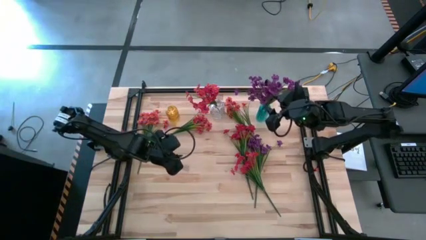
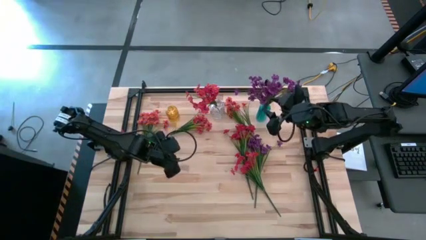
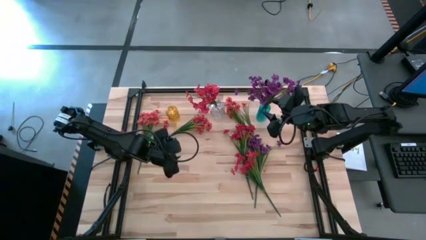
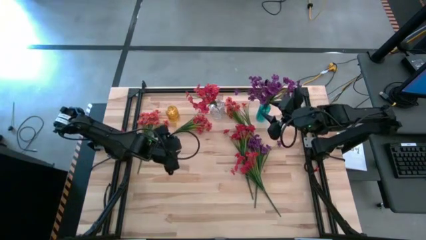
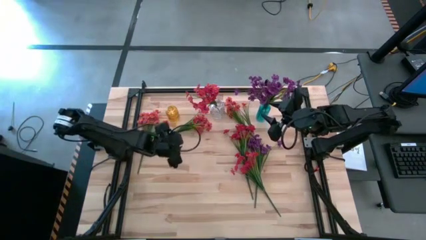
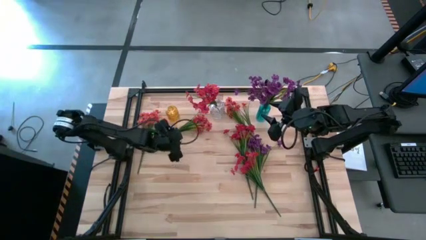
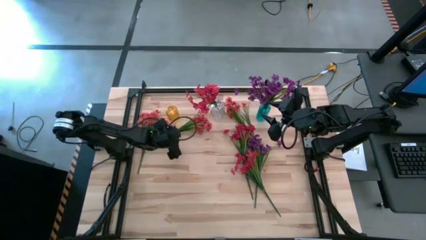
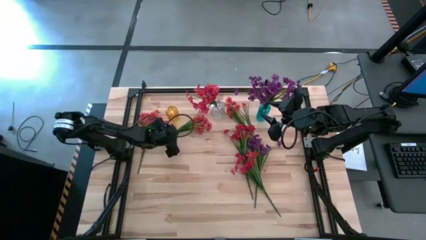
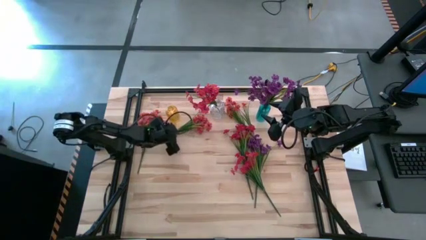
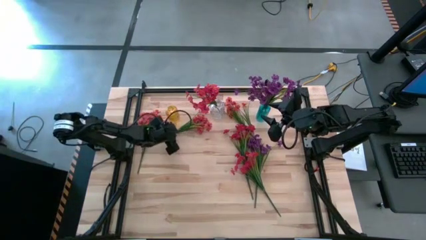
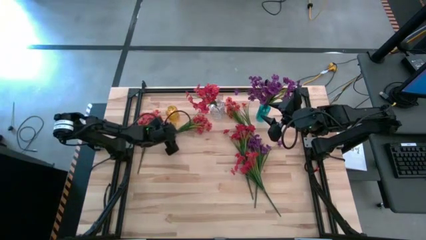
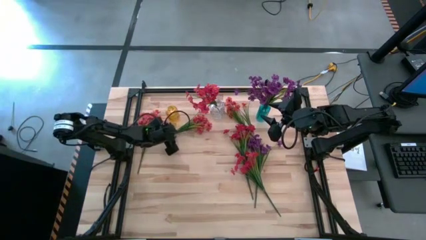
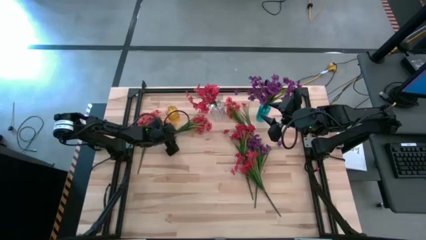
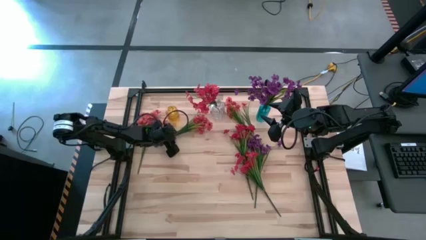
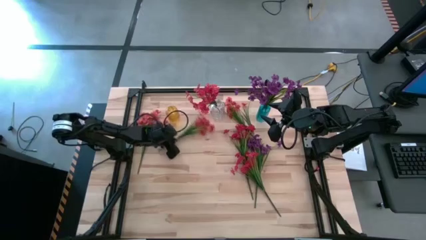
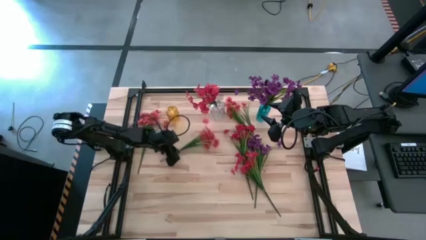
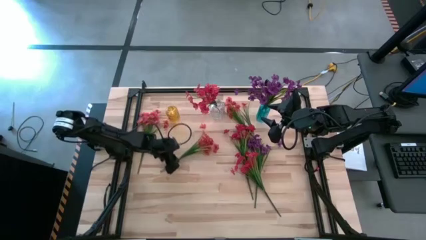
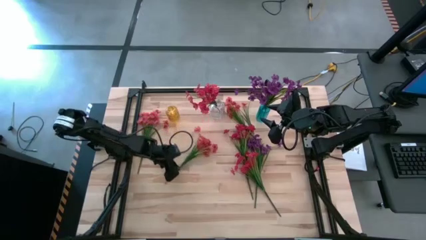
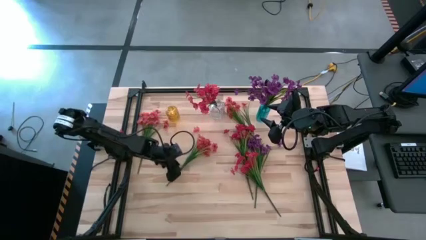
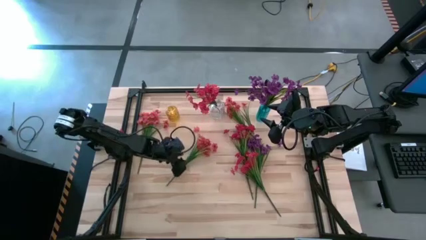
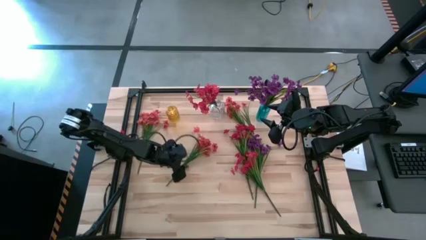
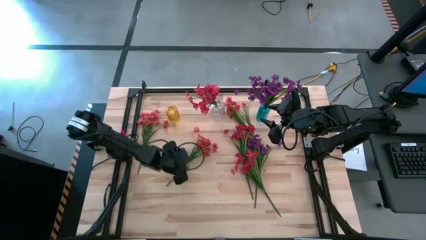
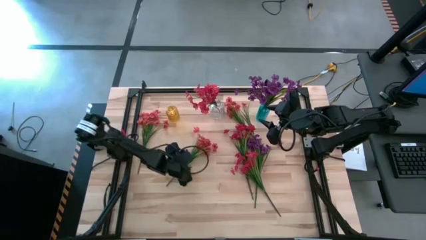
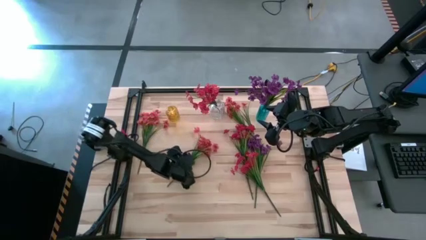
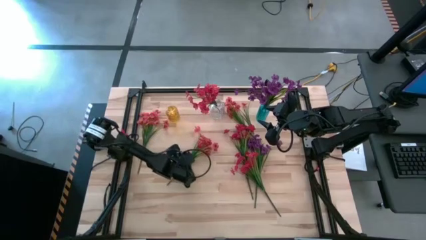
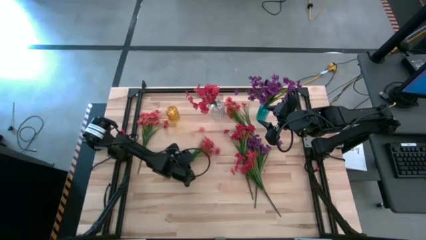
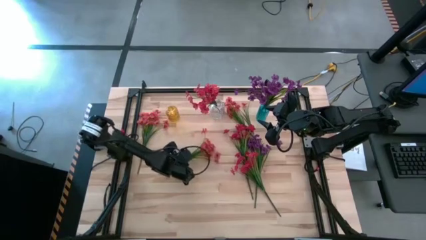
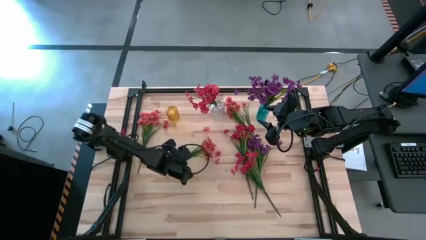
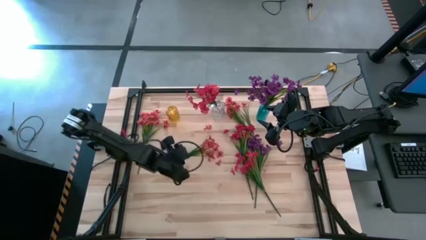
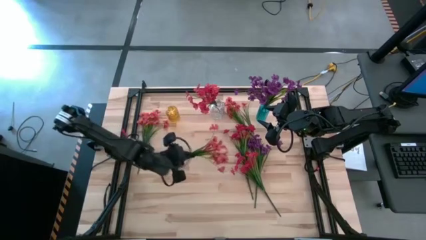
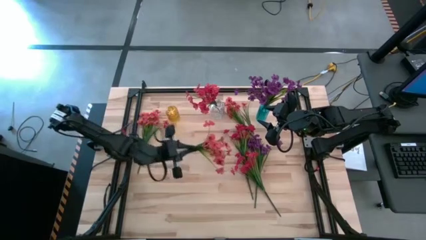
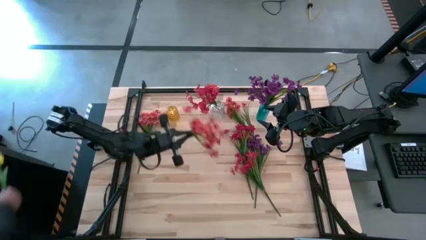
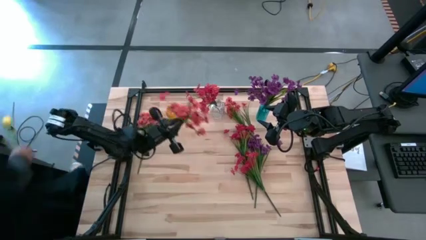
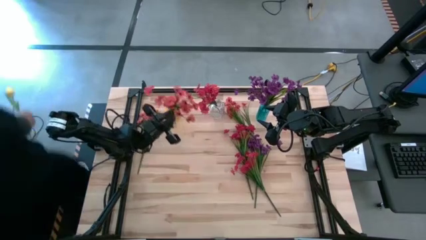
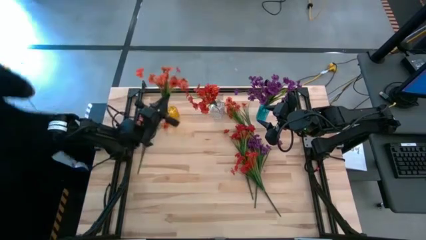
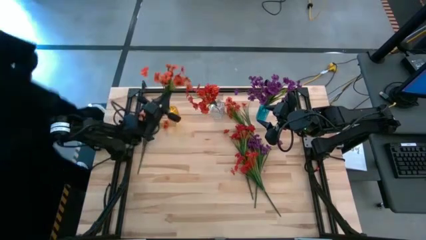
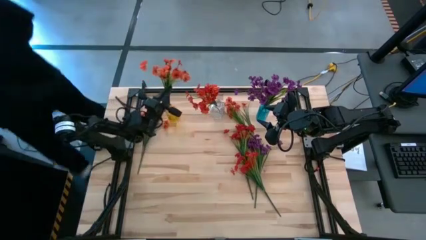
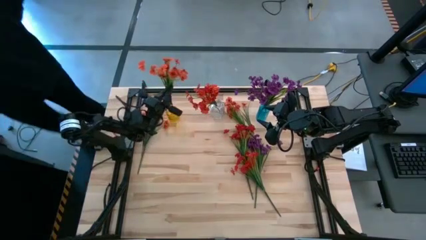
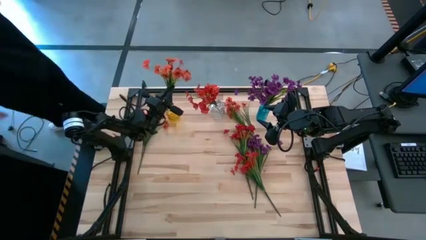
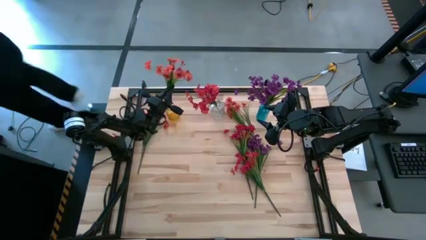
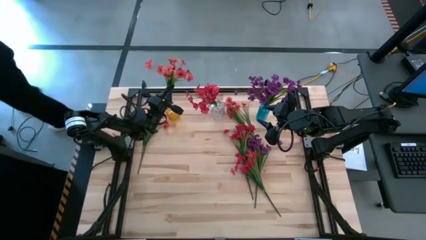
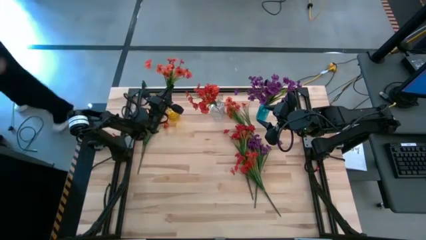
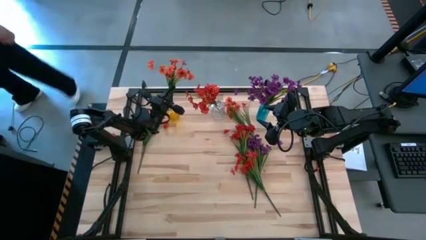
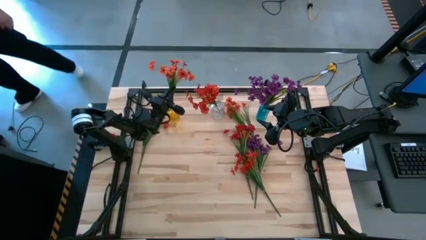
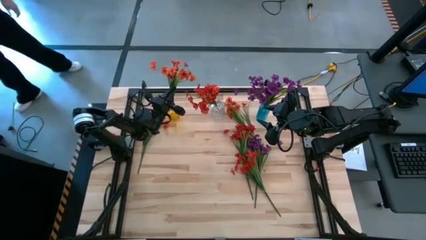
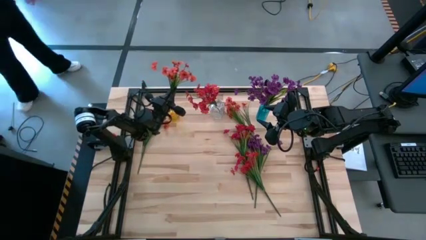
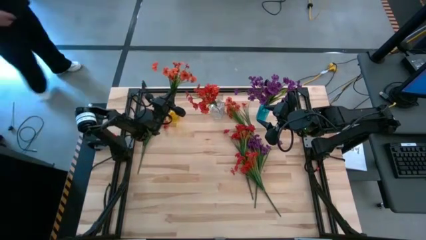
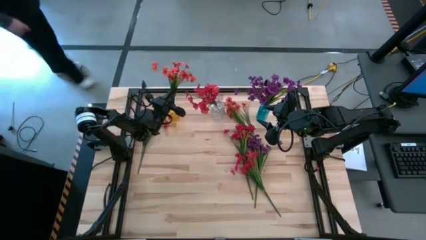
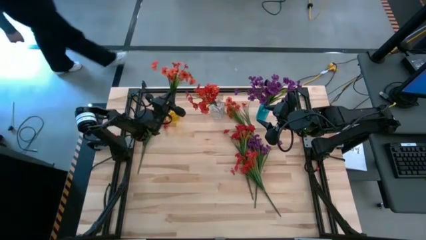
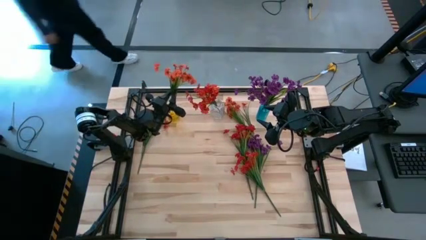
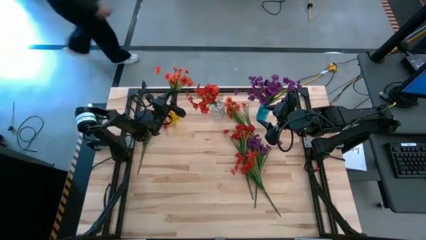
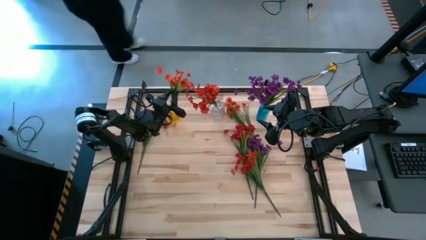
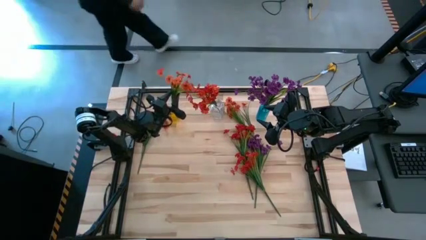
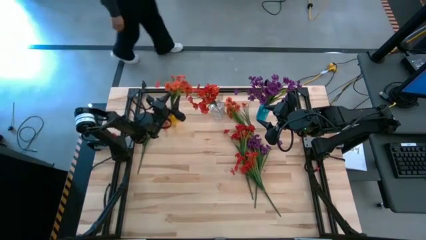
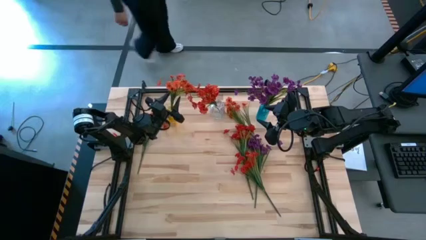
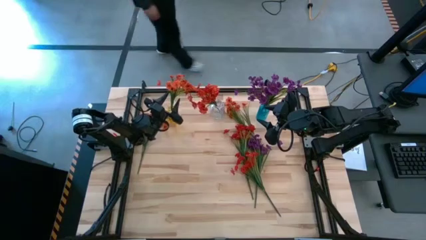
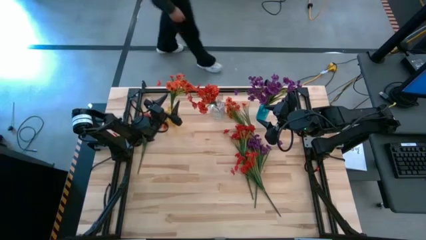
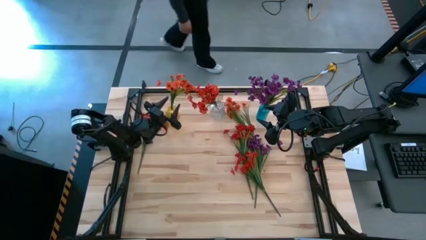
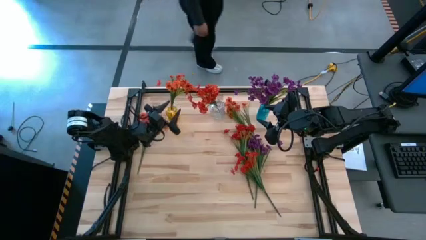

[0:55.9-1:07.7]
Task: Sort flowers into vase by color
Put the orange flowers into the yellow vase

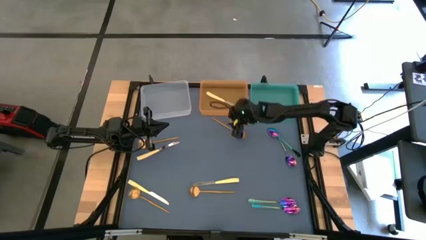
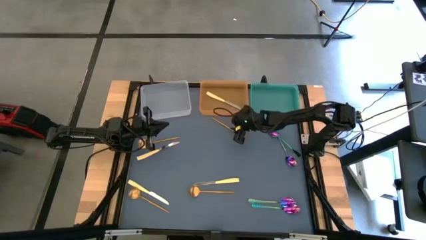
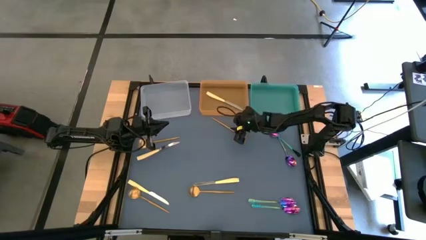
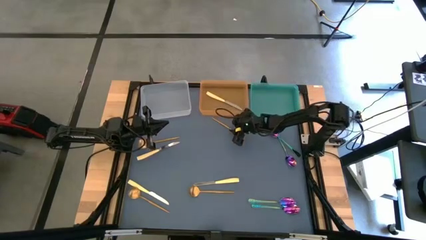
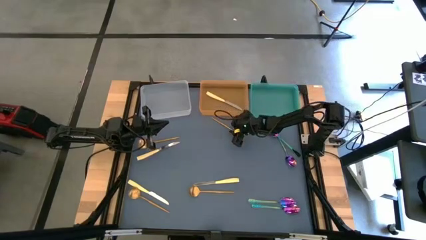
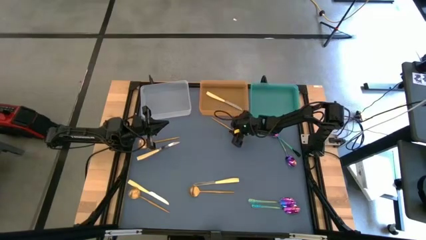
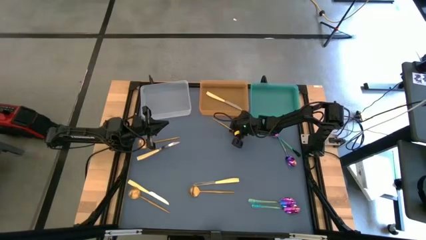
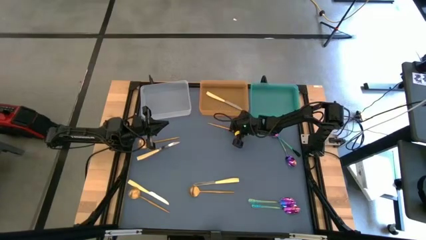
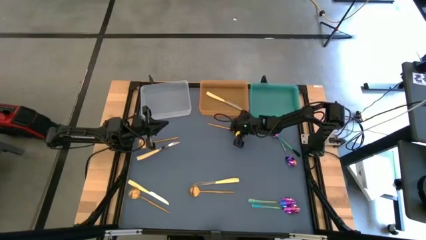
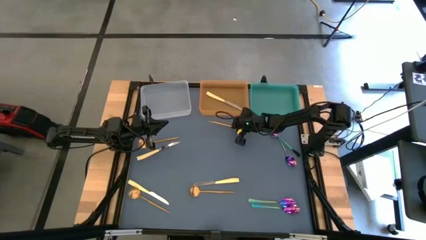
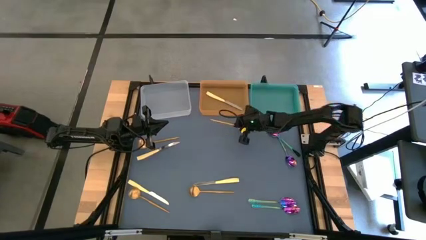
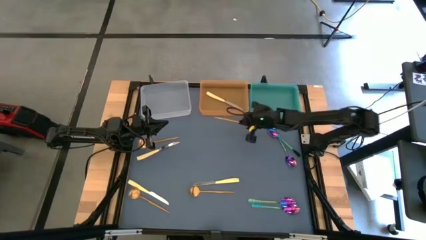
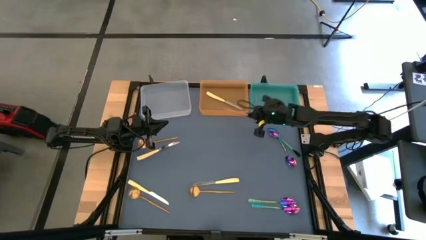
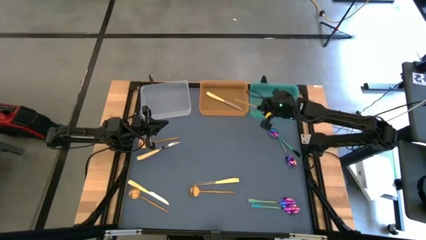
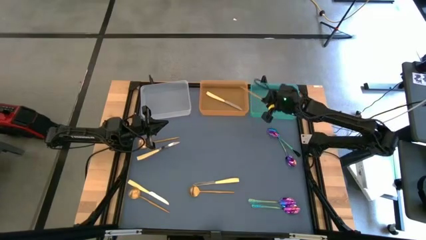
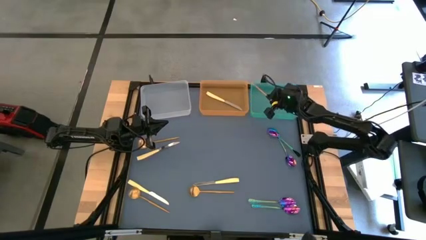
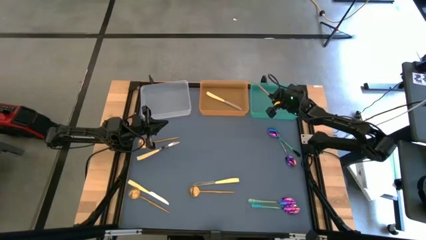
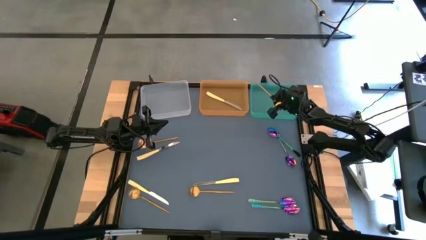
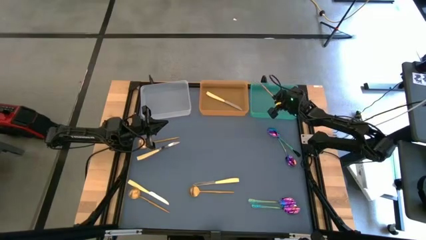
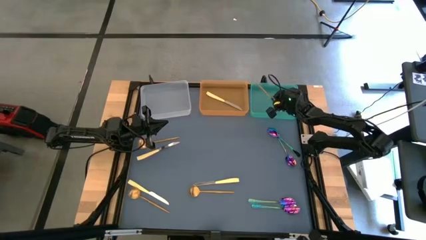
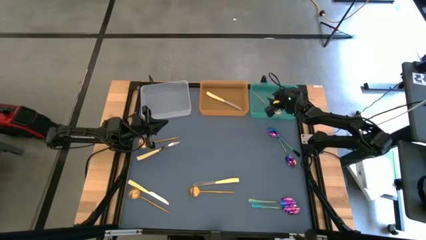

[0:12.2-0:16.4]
Task: Sort silverware by color (type)
Put the golden spoon into the green bin
